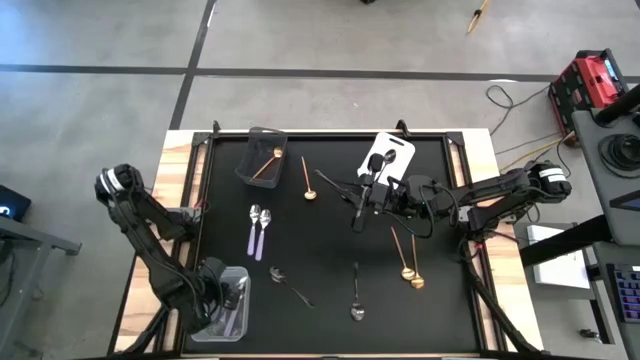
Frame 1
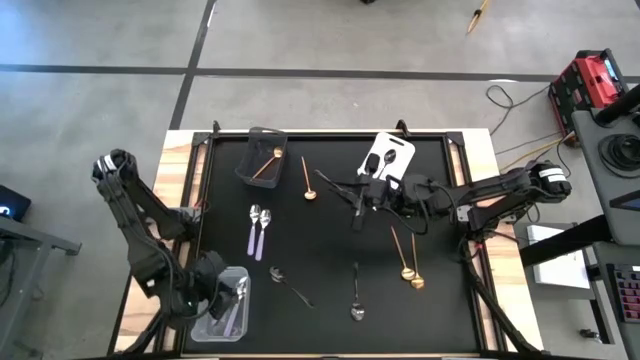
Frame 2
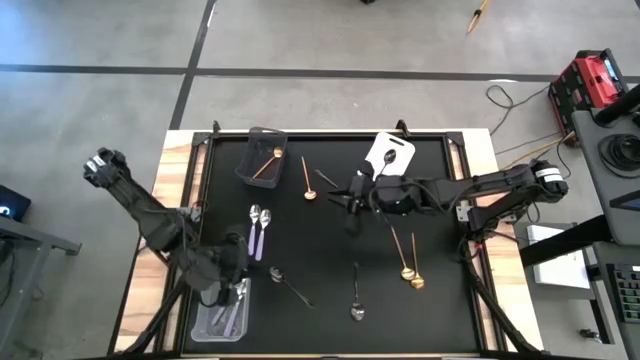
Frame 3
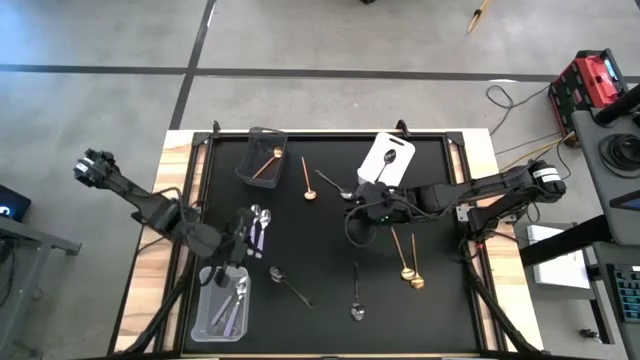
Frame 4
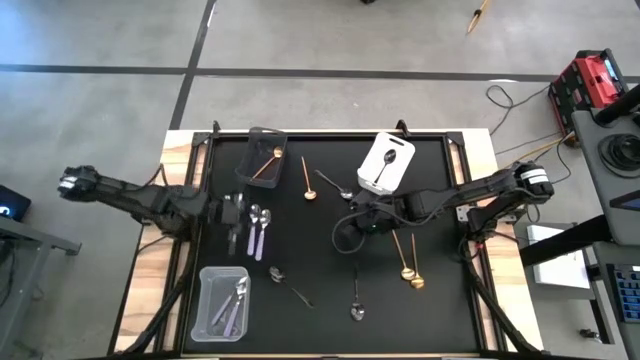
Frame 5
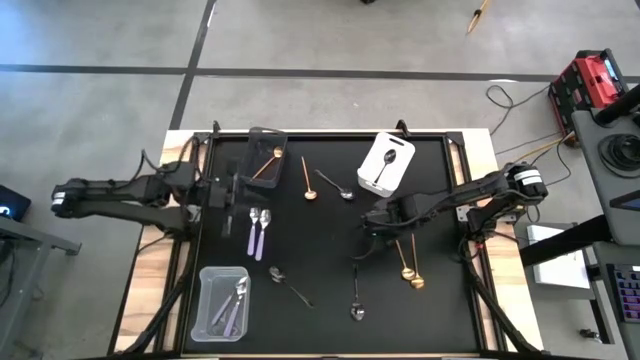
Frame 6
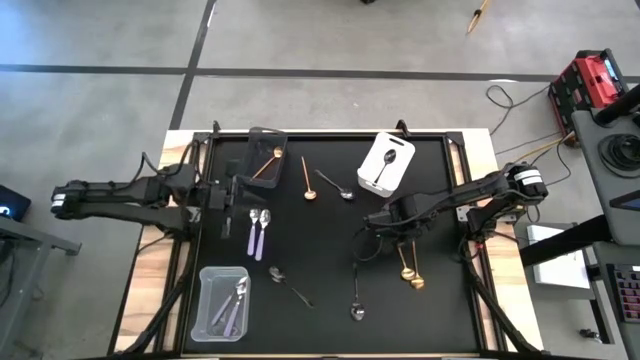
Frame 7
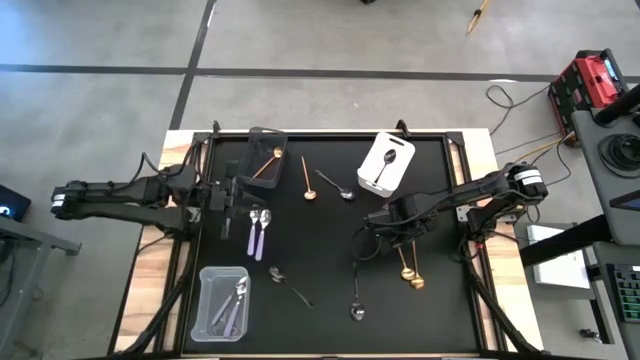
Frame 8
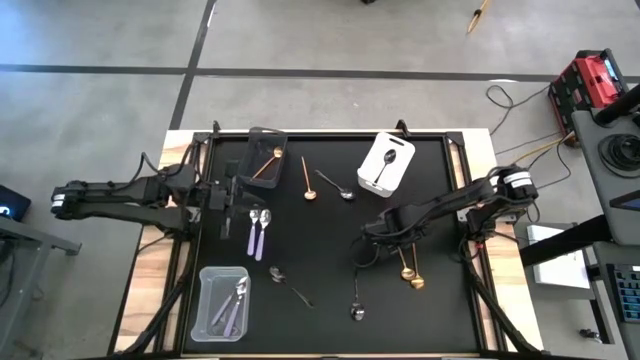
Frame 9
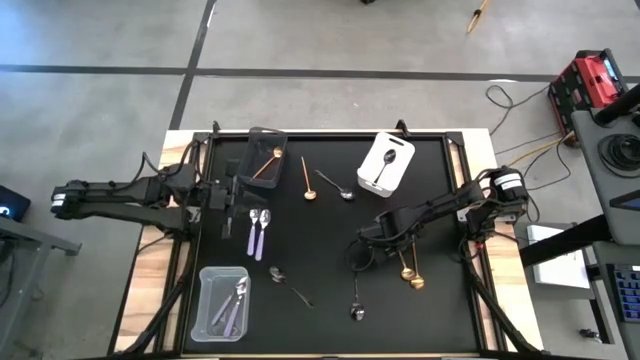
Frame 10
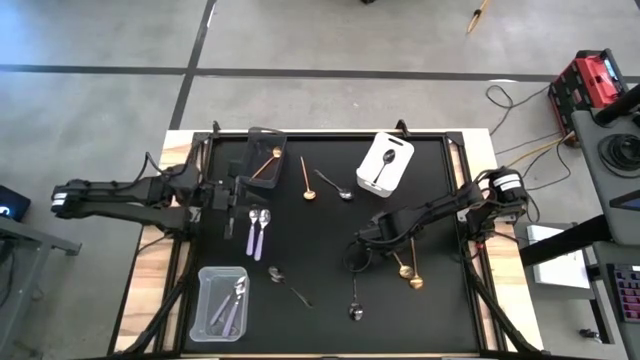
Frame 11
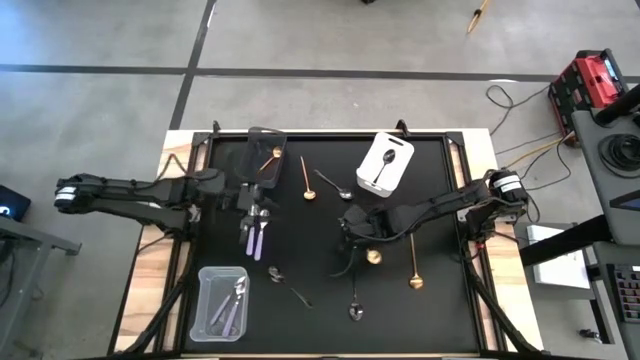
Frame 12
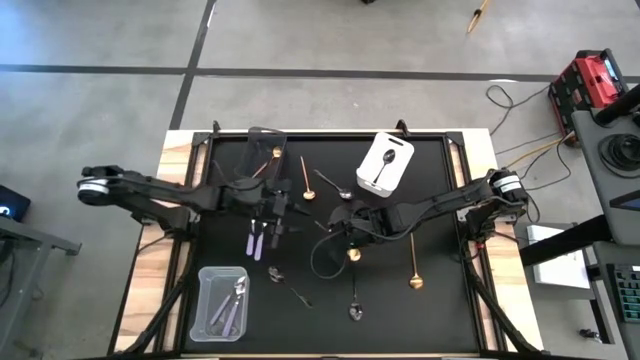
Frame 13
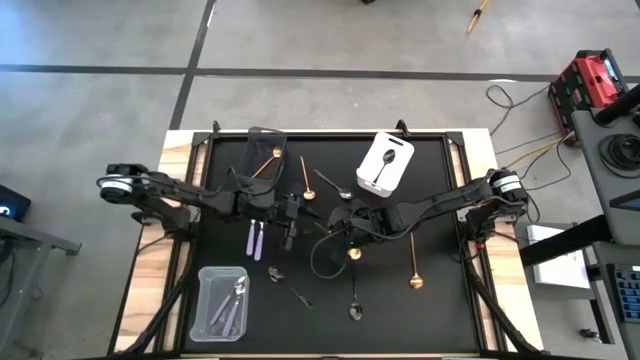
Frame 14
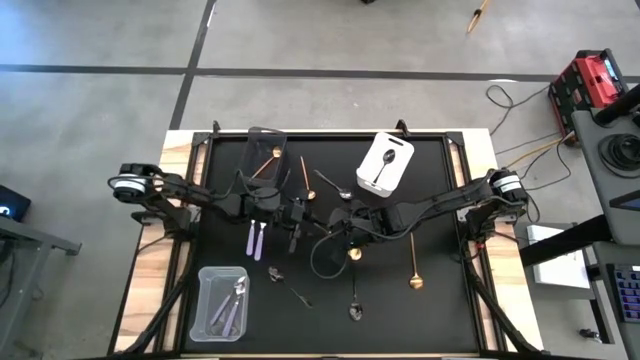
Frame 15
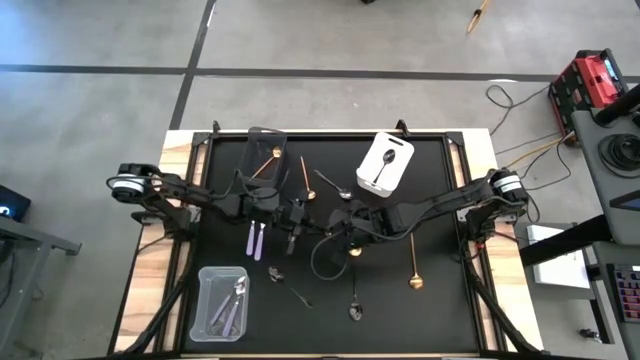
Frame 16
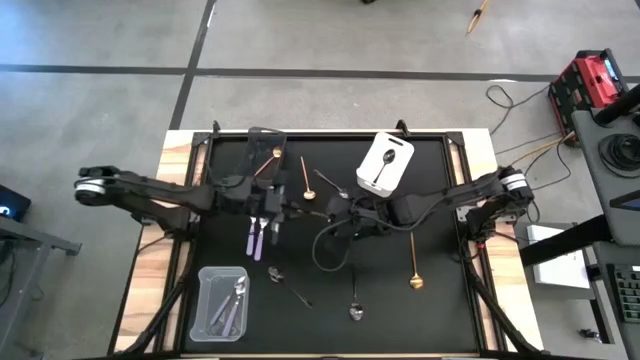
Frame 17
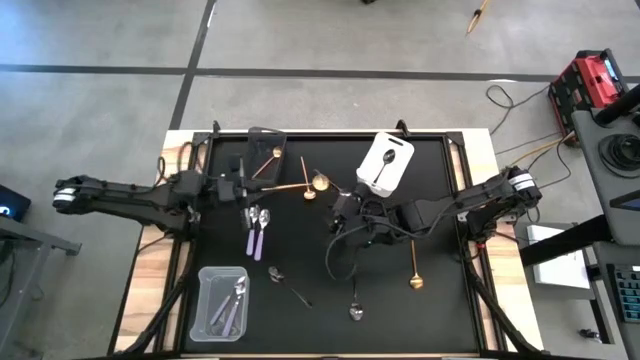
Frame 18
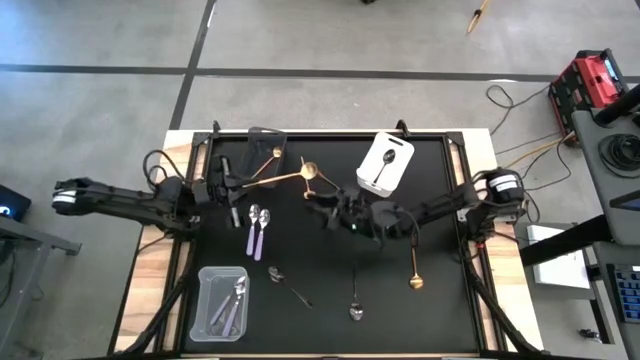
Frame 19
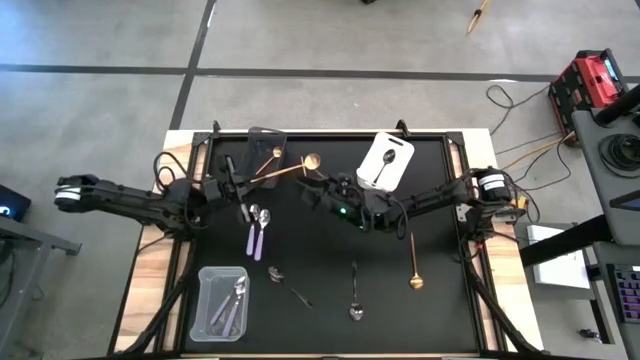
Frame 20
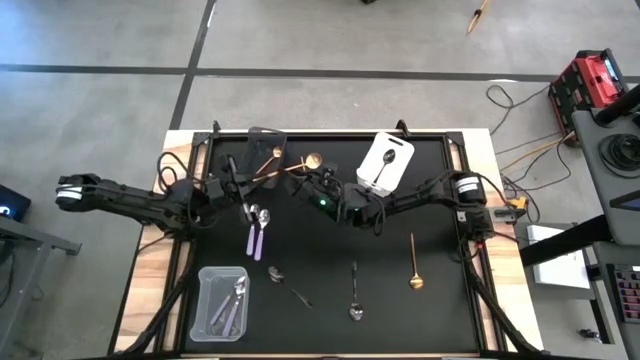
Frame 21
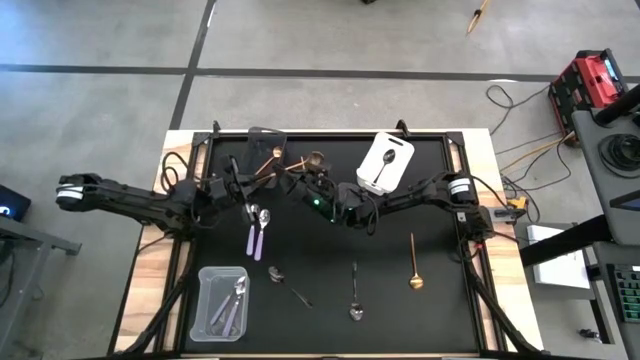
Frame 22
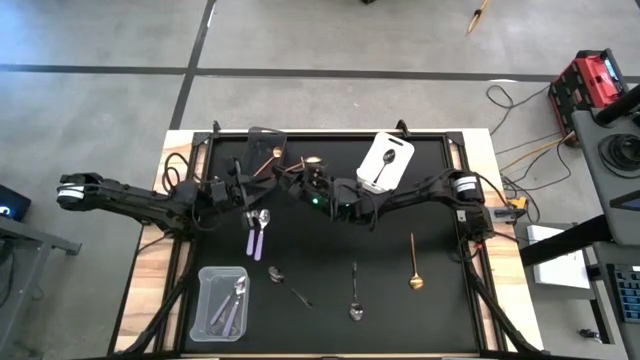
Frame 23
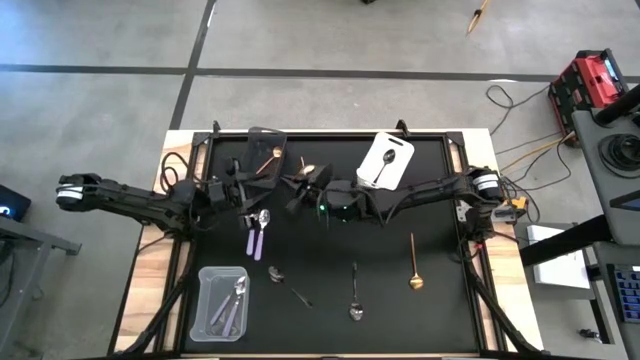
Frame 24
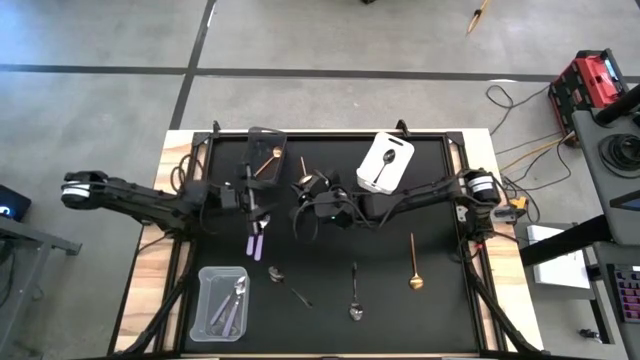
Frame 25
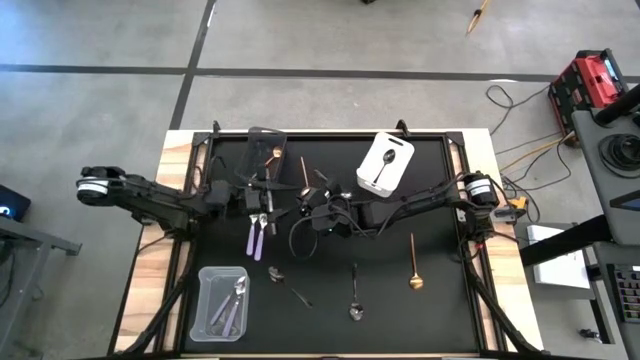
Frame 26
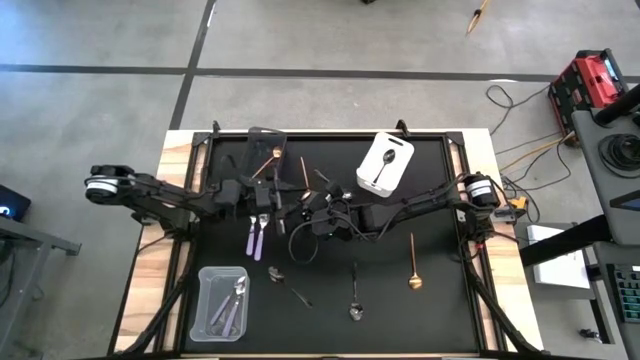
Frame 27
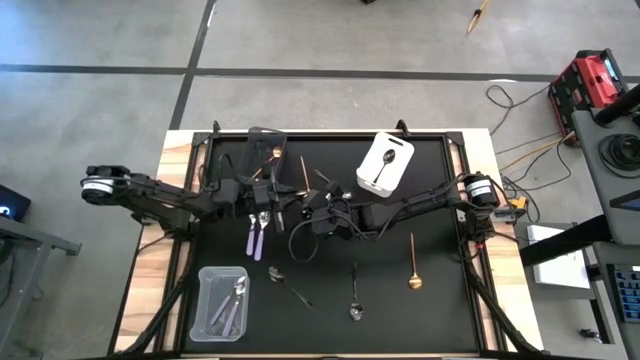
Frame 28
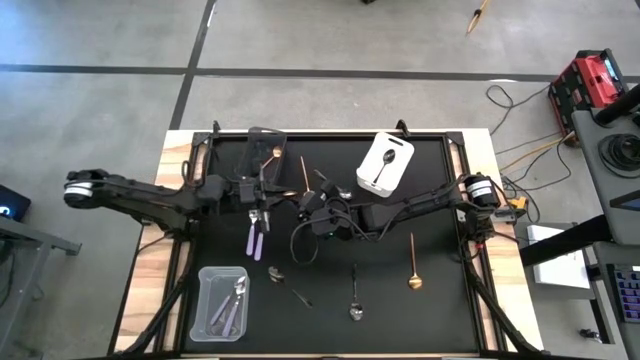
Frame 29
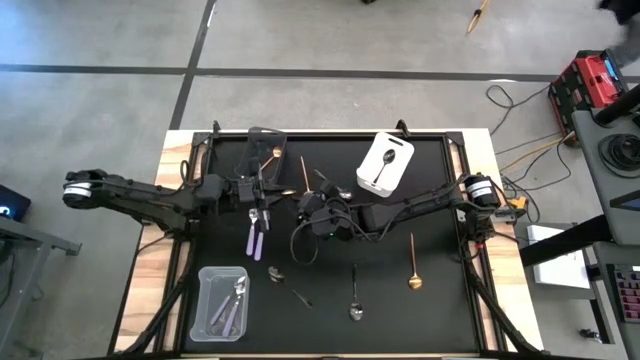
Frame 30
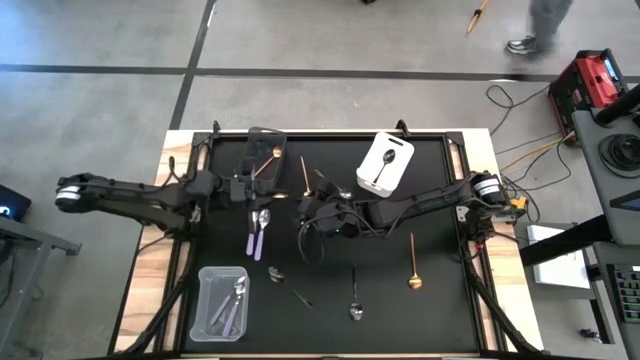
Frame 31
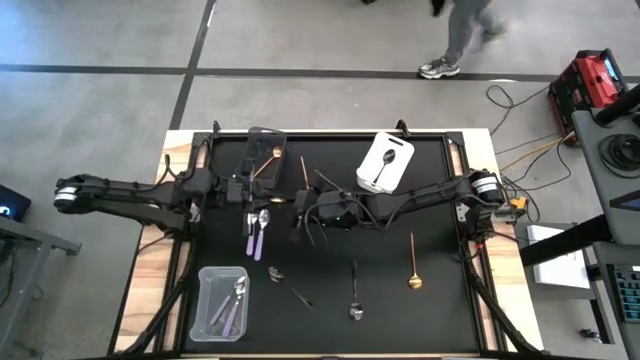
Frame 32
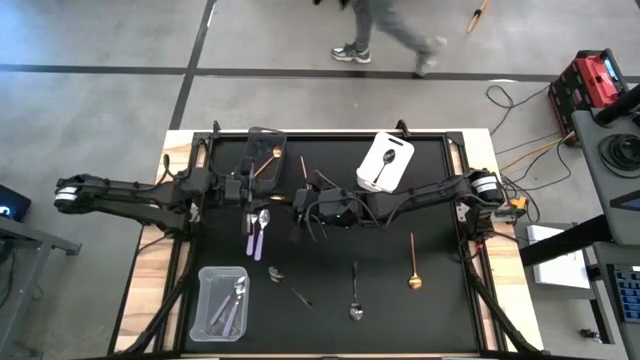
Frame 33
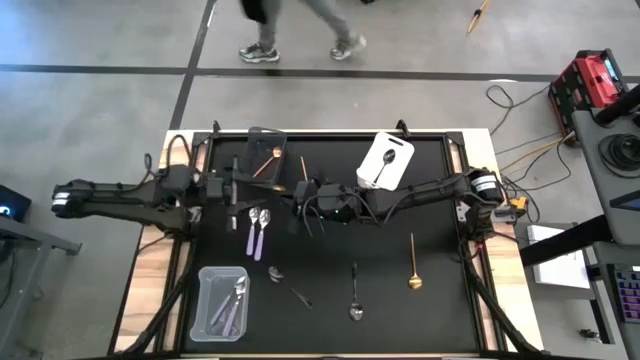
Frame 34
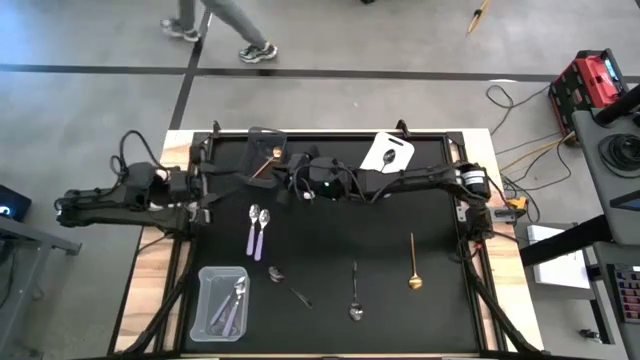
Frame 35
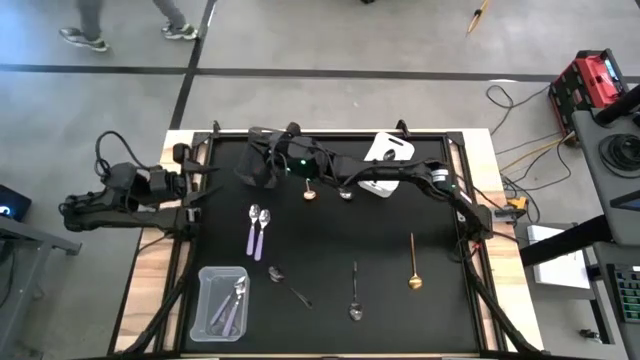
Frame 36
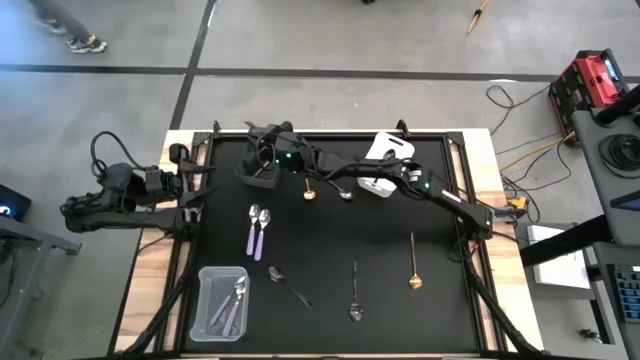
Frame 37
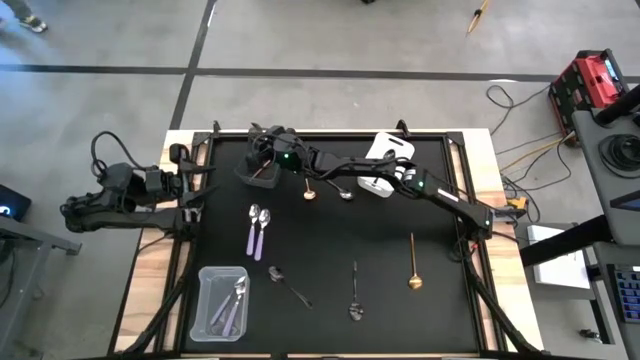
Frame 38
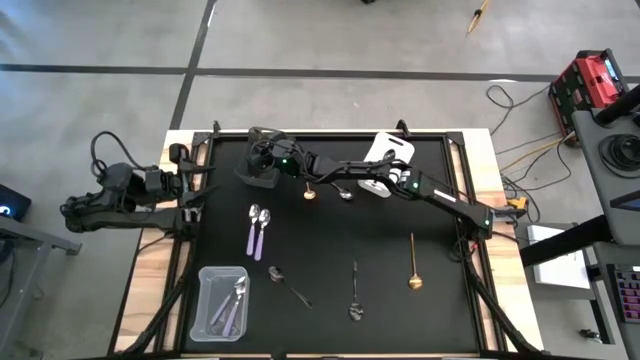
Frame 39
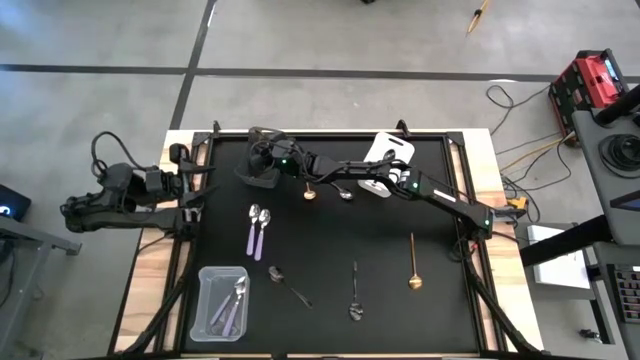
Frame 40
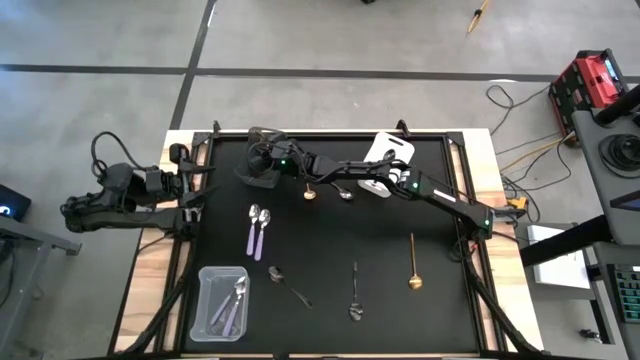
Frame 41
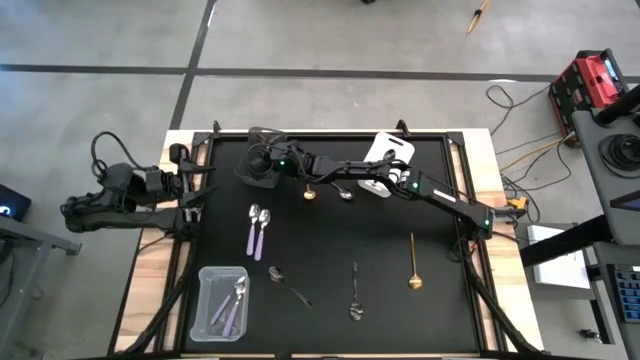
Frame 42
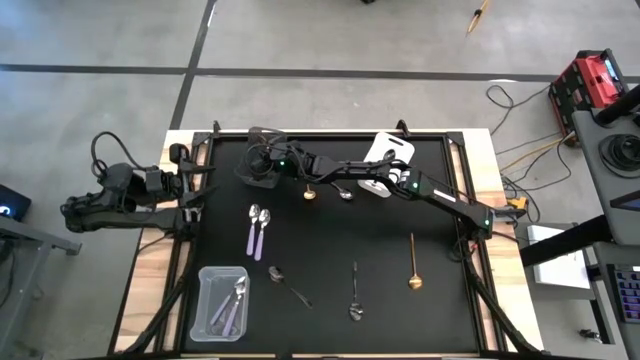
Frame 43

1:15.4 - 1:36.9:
Task: Sort silverware by color (type)
Put the gold spoon into the black bin
